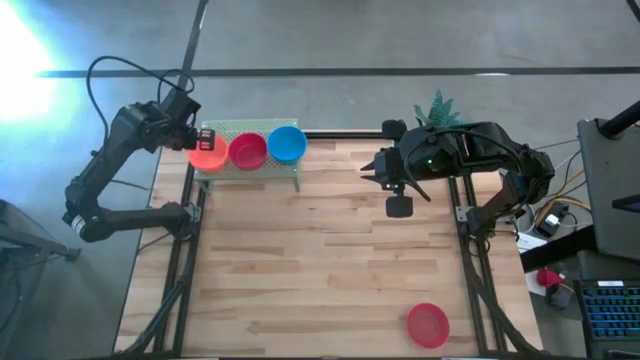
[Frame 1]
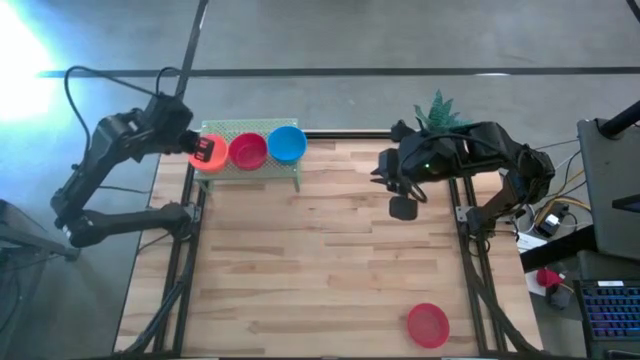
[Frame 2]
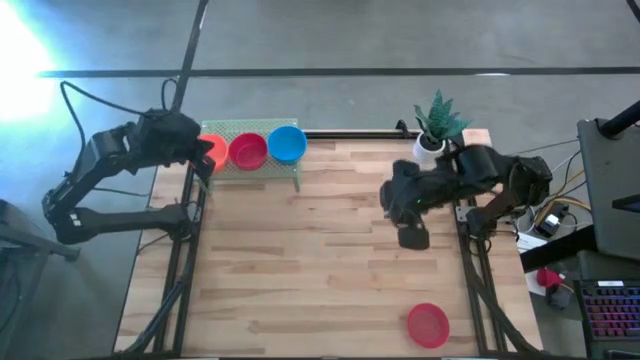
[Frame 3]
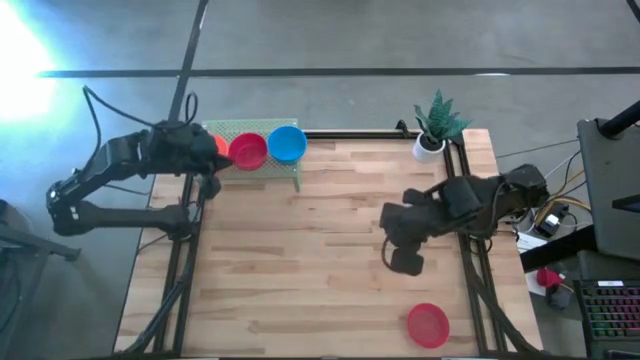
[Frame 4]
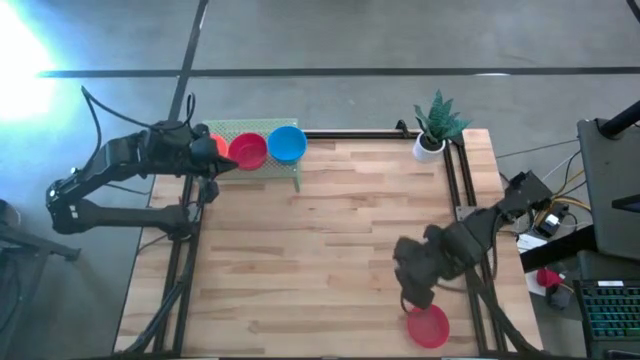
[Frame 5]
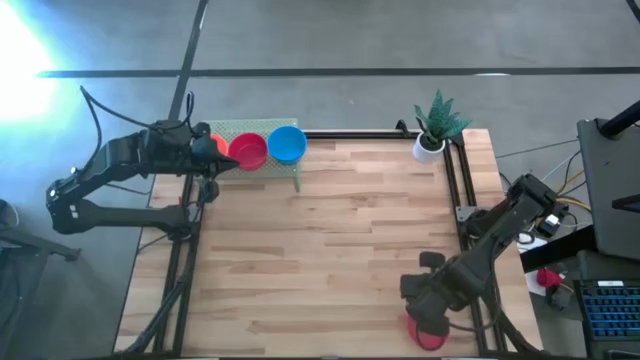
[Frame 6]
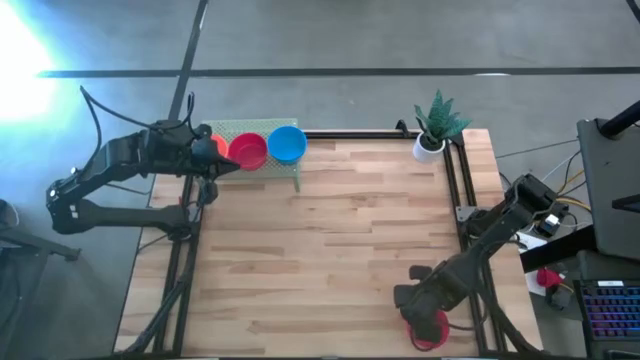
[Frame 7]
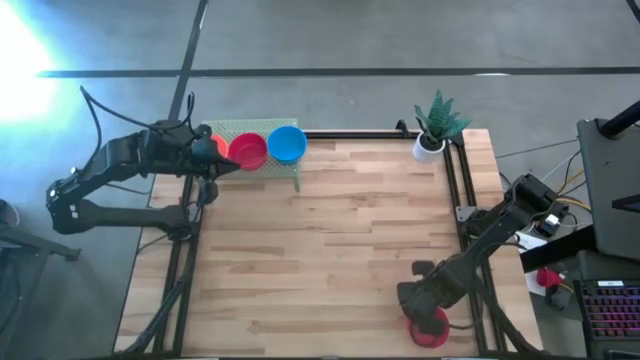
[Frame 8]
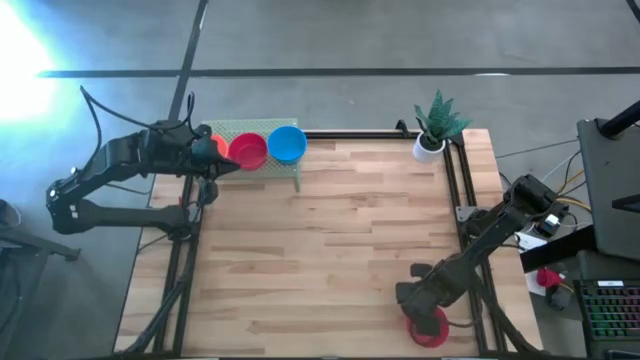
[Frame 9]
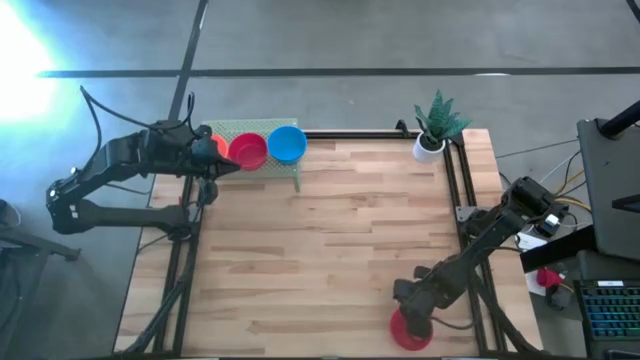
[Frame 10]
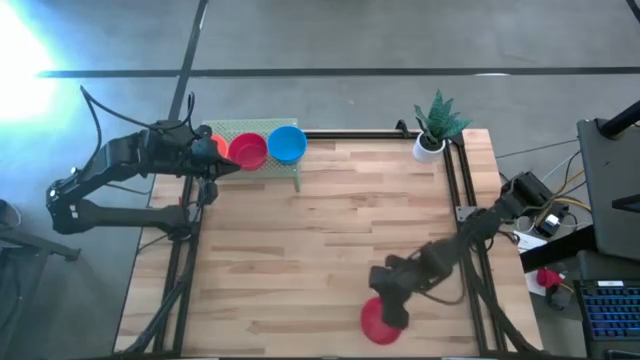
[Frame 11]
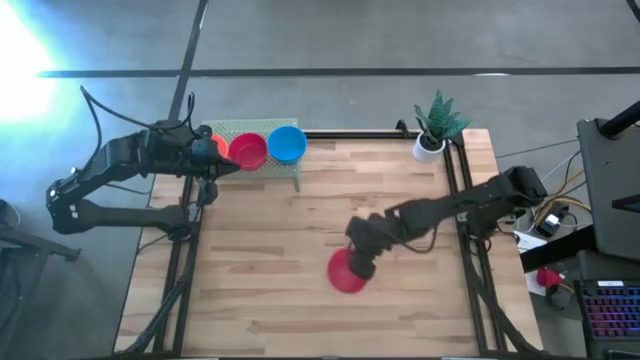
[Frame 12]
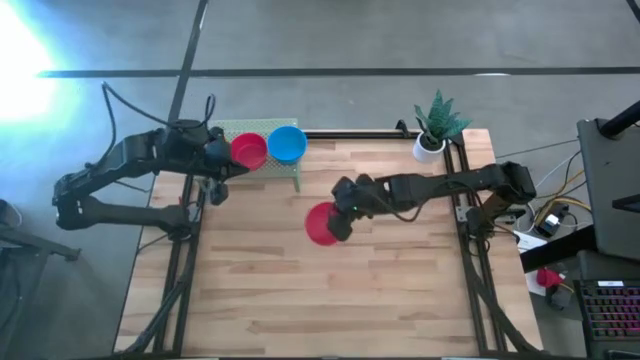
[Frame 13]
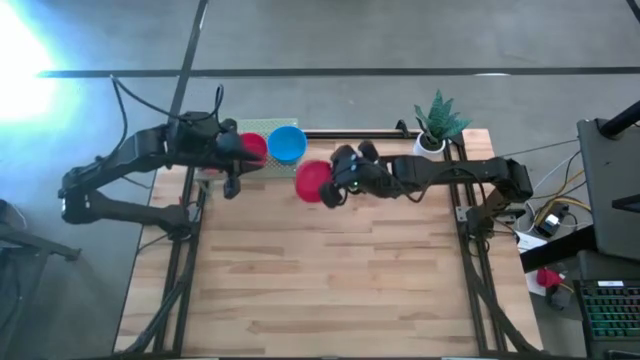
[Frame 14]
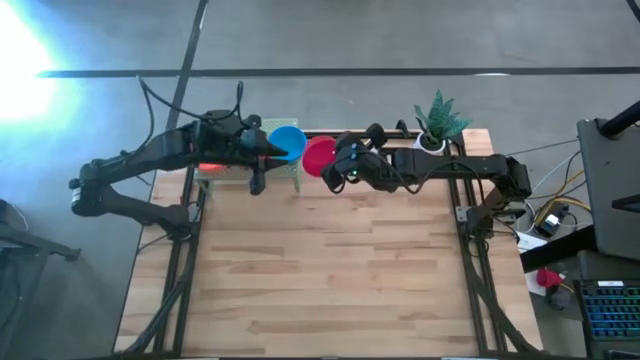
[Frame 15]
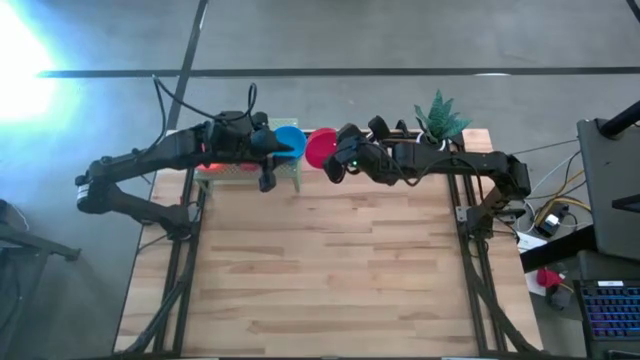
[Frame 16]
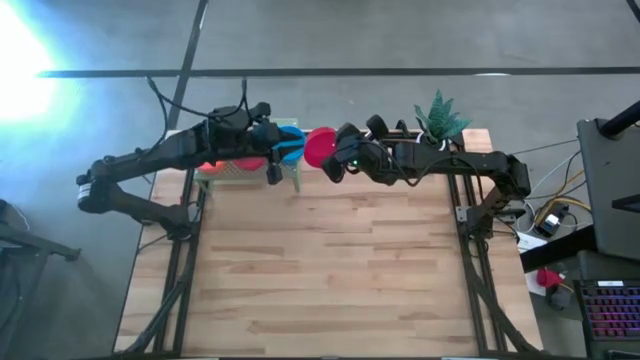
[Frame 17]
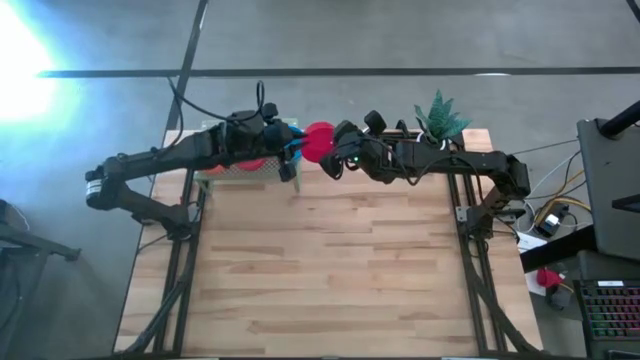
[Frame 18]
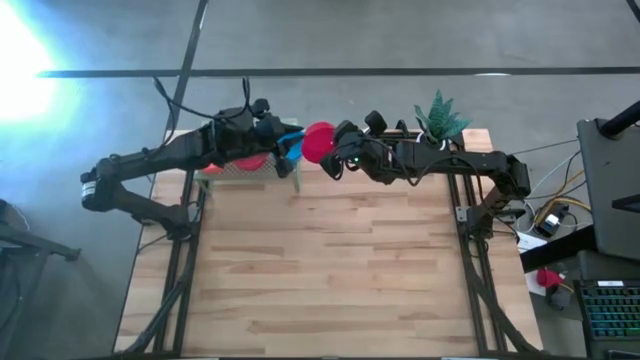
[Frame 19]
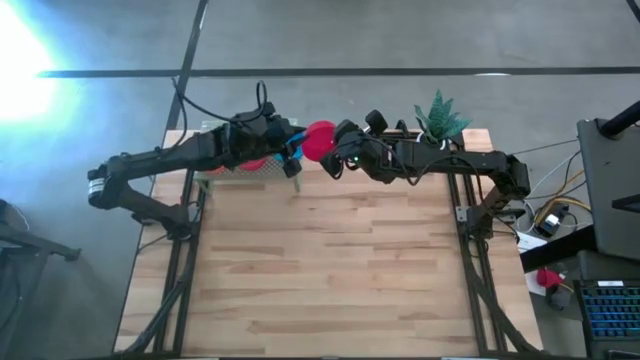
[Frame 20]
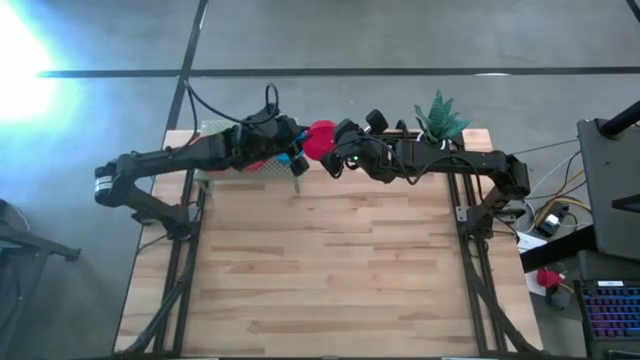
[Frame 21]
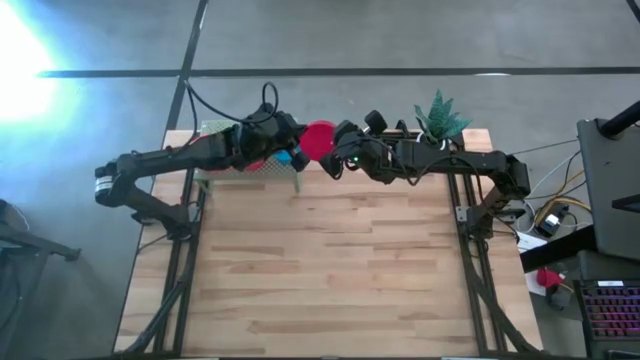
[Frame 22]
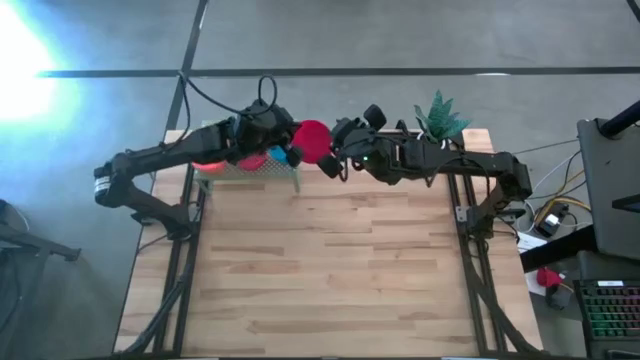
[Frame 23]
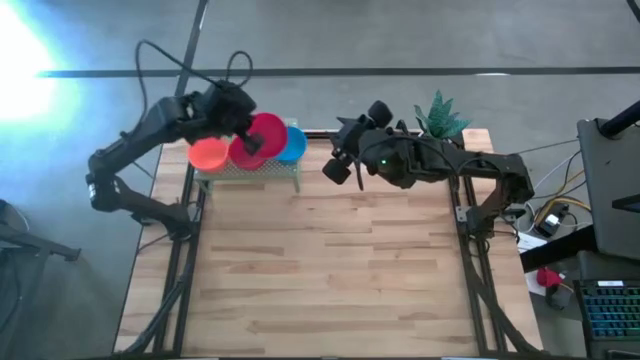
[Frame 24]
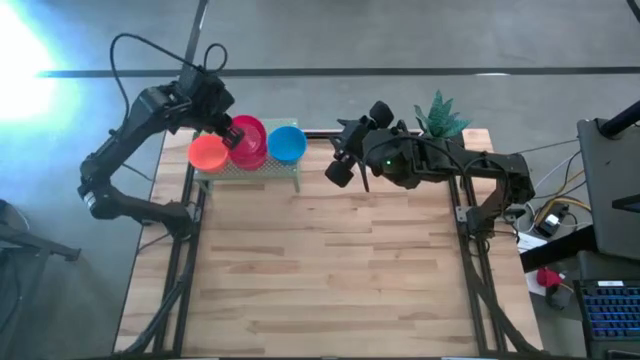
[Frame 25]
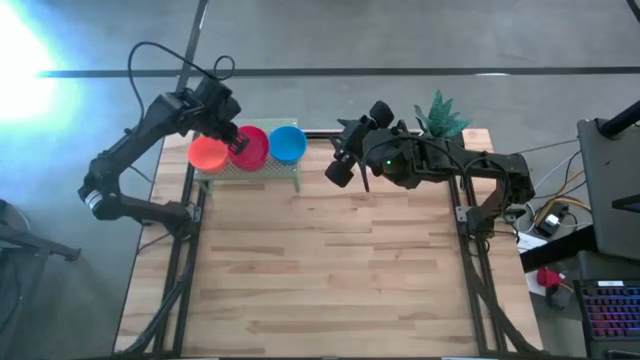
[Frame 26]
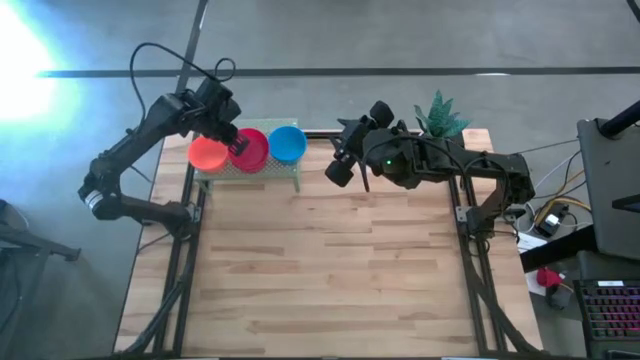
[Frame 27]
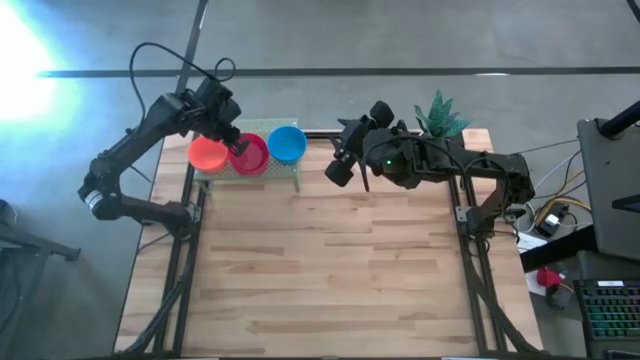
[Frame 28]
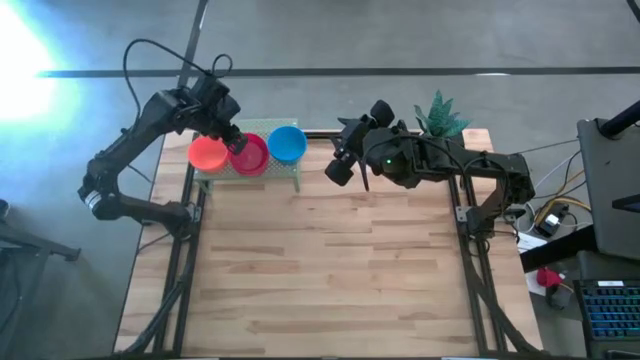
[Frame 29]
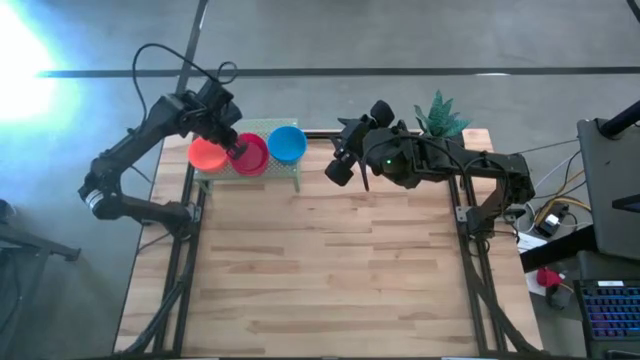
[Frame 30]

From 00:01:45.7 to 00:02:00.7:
Task: Pick & Place Mini bowls
Stack the red bowl on the top of the other red bowls on the shelf

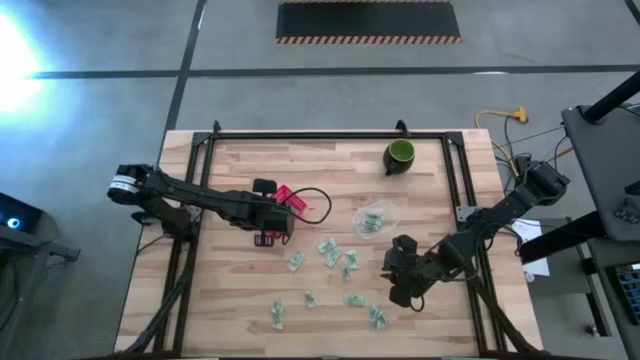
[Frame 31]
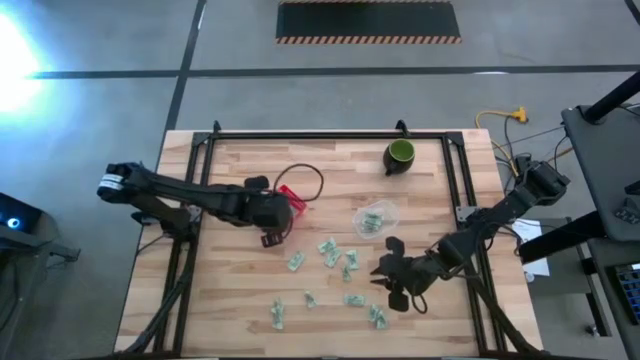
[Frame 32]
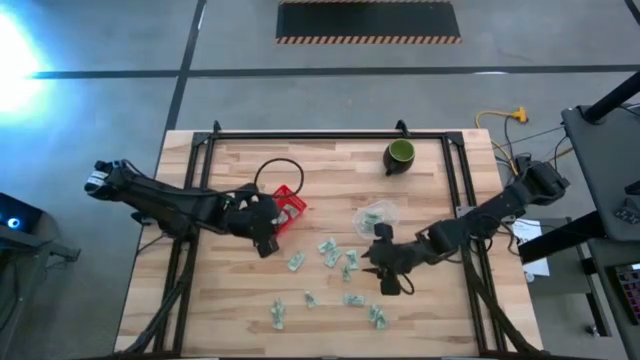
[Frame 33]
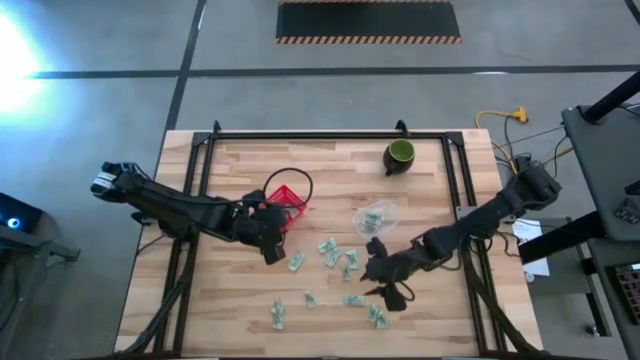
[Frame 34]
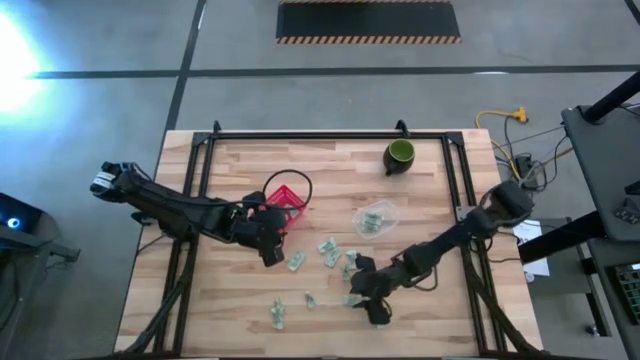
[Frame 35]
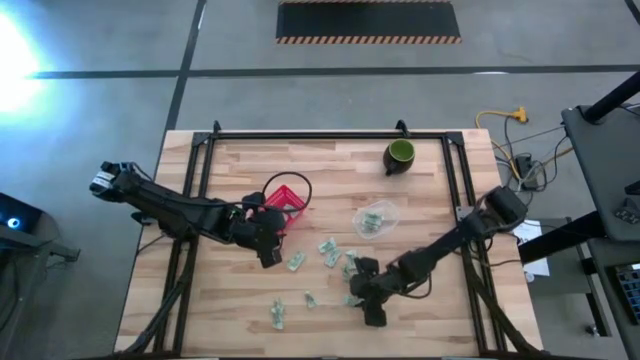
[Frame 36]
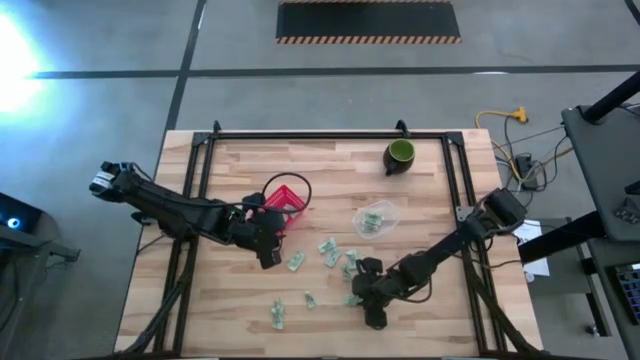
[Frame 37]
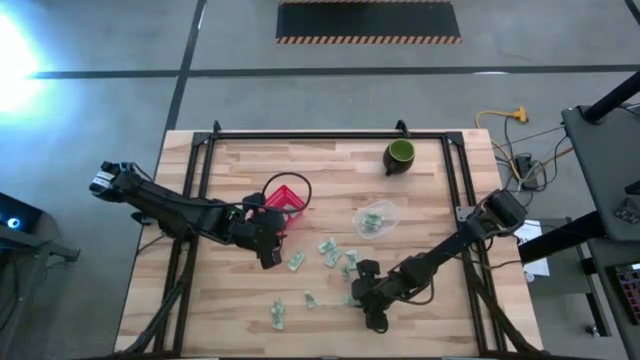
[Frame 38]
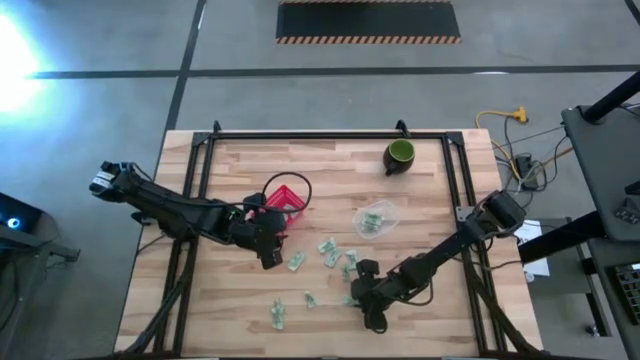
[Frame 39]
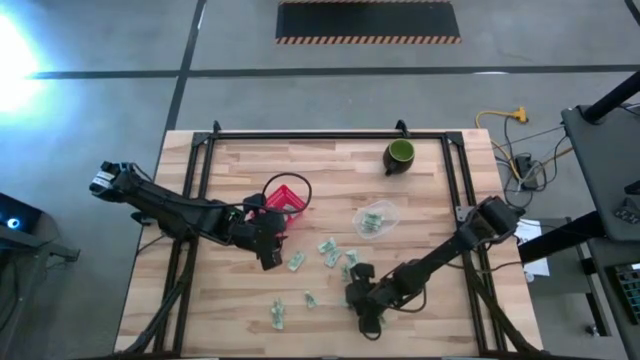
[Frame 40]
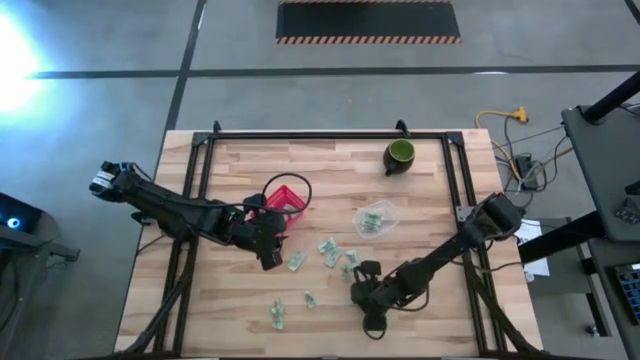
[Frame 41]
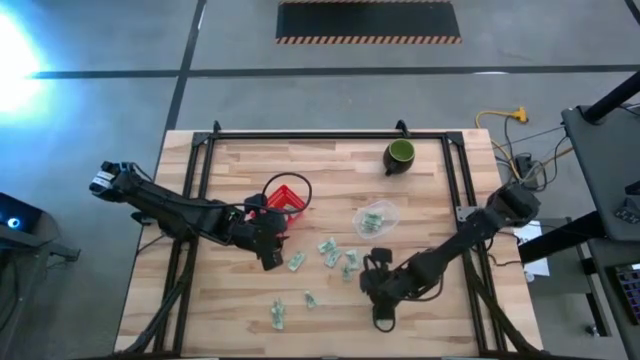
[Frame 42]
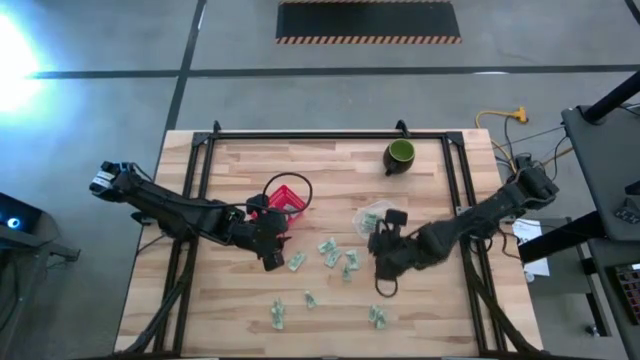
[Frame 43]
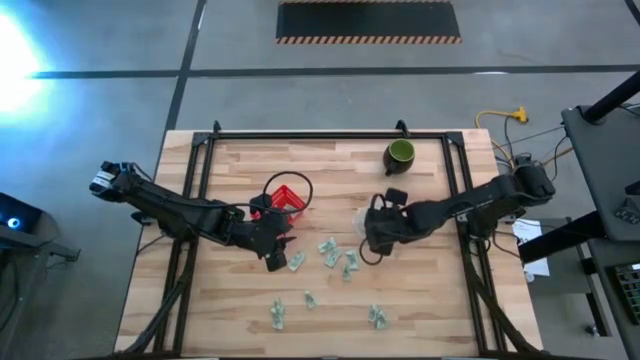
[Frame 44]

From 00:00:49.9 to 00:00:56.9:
Task: Pick and place items into bin
Put the stevia packet into the transparent bin
